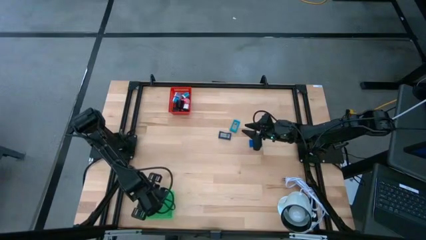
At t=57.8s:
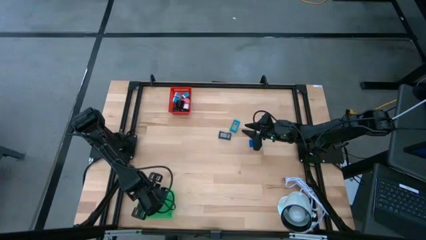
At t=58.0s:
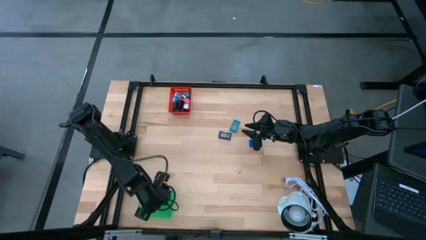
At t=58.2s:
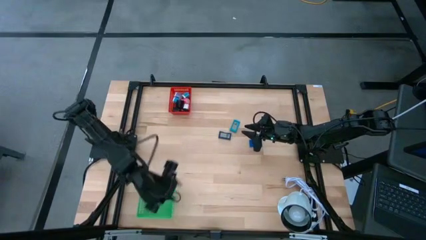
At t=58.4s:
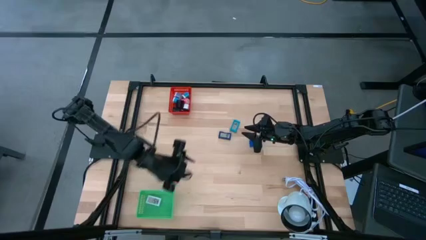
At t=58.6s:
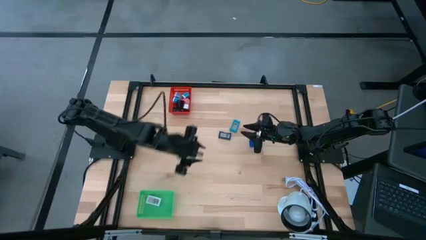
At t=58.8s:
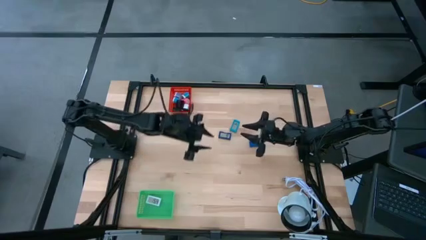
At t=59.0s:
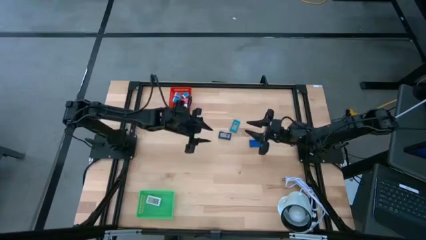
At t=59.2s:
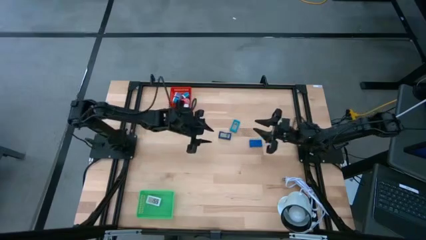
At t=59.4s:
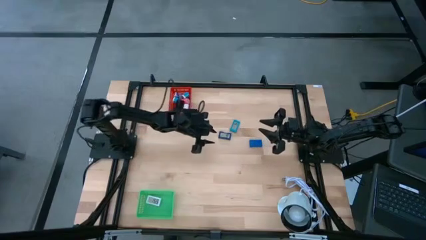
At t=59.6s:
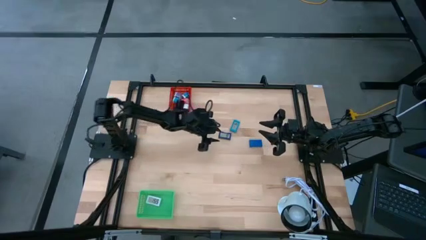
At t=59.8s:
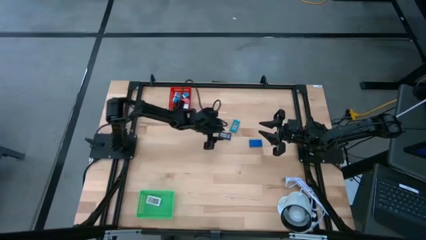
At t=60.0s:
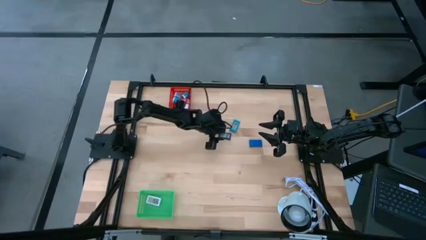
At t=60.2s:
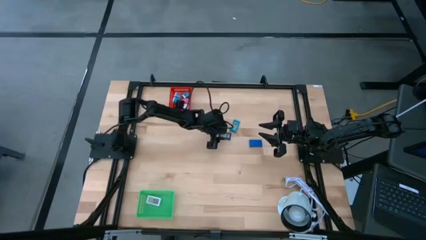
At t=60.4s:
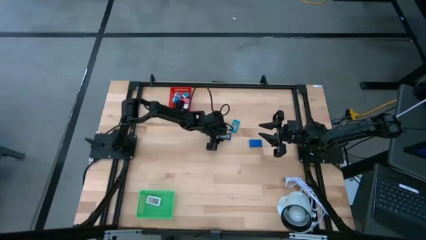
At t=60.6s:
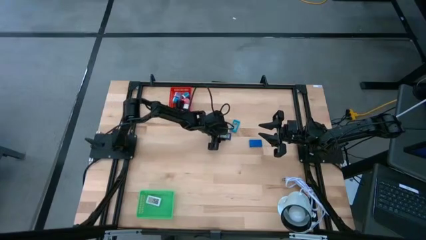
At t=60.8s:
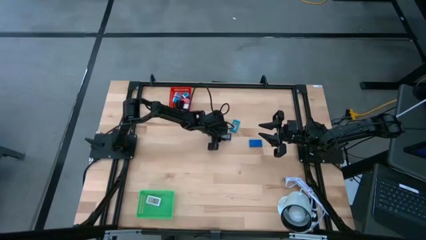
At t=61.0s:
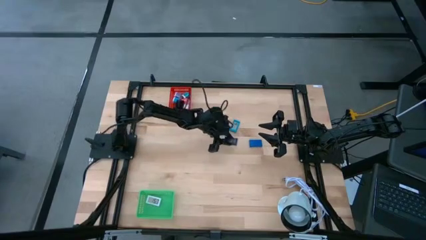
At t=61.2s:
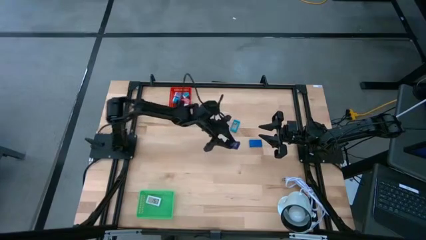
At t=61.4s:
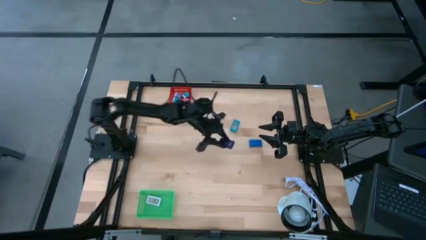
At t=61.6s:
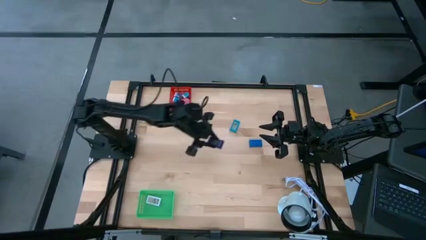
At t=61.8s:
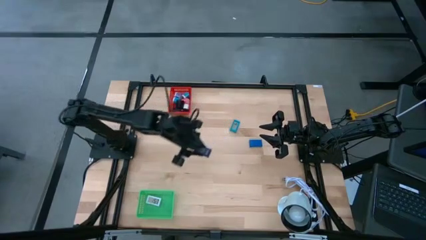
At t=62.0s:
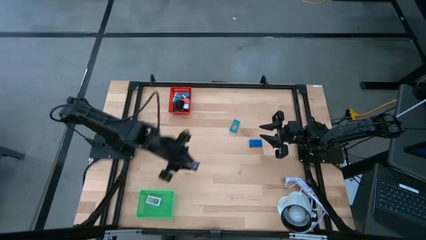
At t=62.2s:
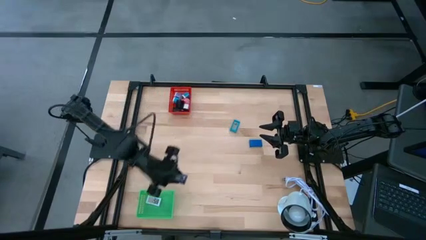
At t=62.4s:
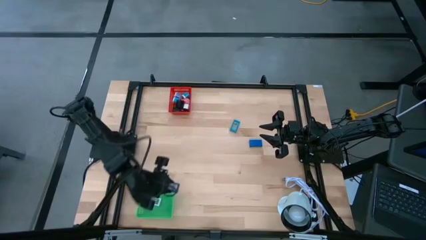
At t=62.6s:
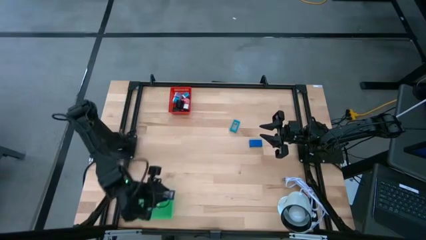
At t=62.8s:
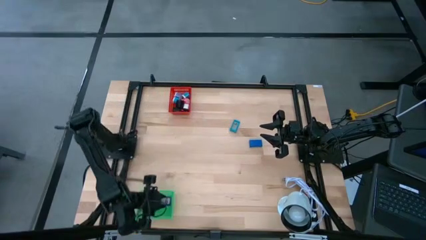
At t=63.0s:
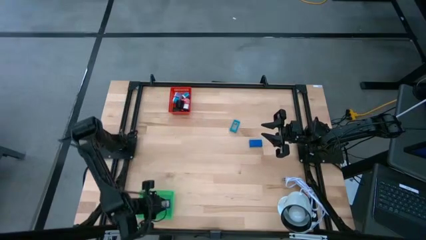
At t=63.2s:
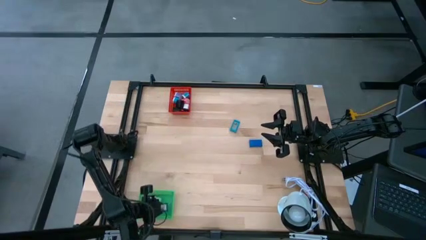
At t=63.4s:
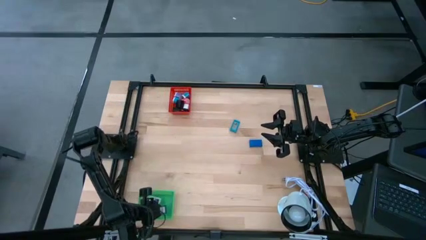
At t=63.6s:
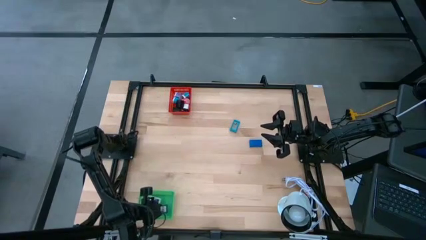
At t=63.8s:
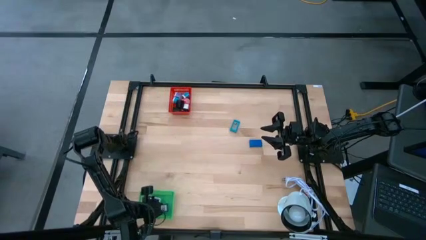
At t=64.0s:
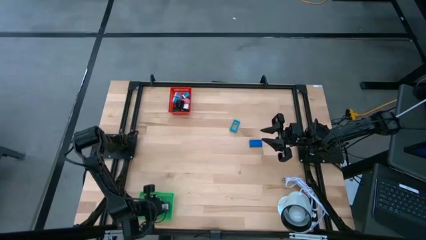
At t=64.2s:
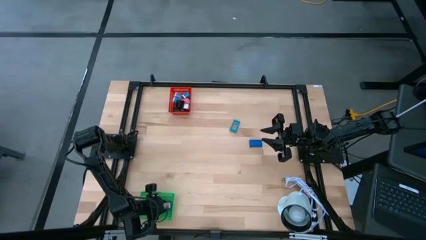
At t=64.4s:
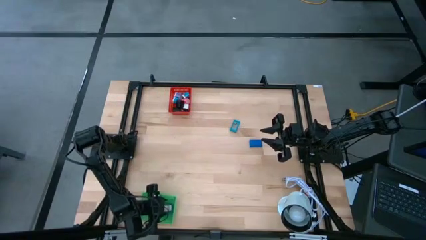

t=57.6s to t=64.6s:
Task: Pick & Place Office items
Put the left blue digital clock into the green bin

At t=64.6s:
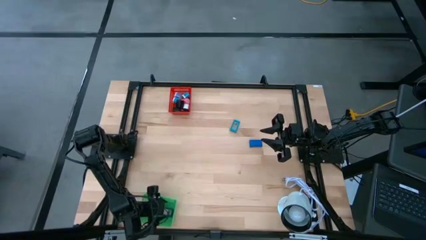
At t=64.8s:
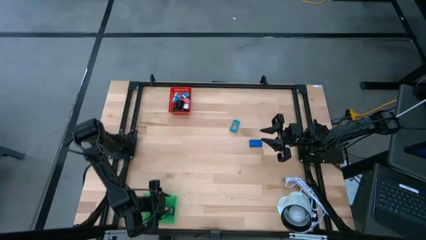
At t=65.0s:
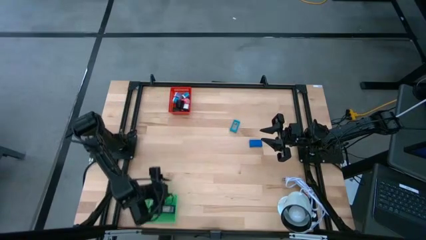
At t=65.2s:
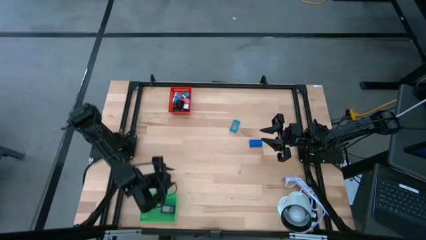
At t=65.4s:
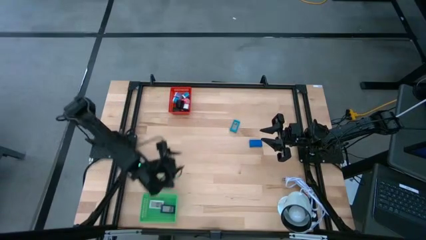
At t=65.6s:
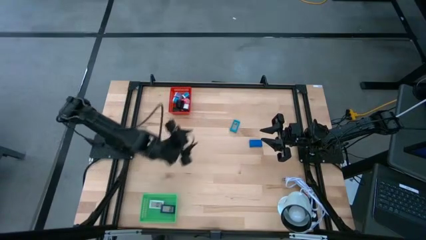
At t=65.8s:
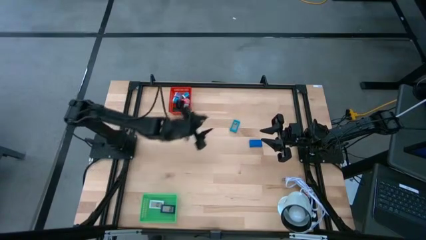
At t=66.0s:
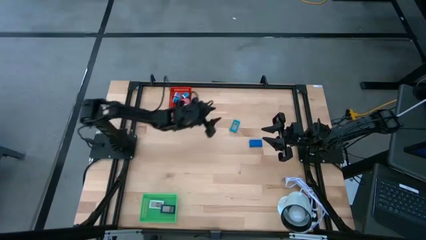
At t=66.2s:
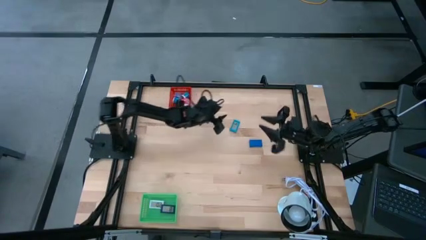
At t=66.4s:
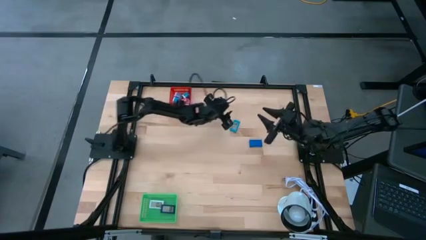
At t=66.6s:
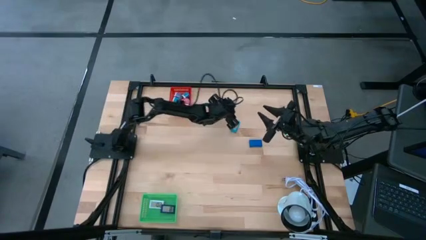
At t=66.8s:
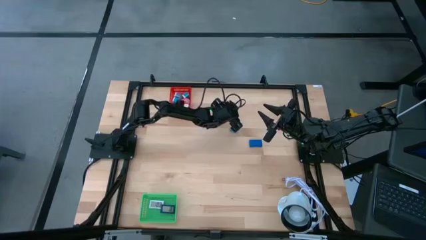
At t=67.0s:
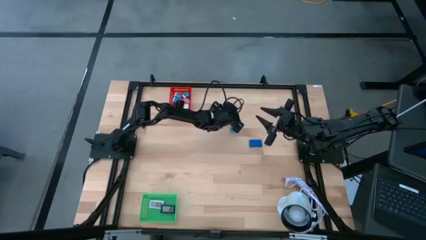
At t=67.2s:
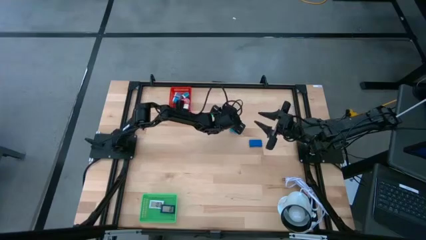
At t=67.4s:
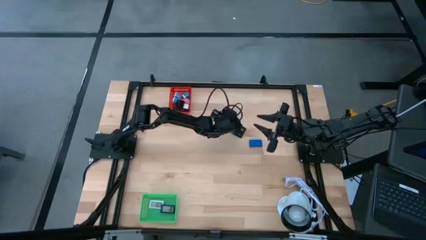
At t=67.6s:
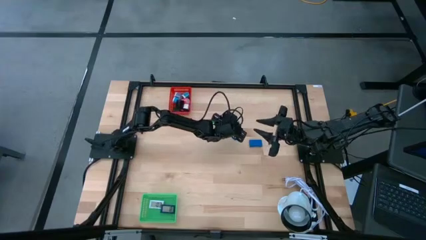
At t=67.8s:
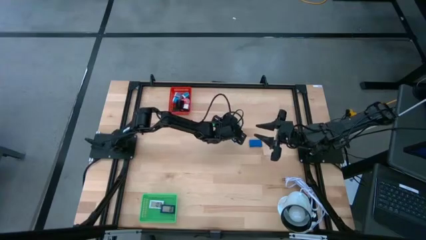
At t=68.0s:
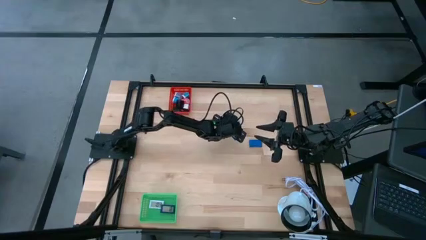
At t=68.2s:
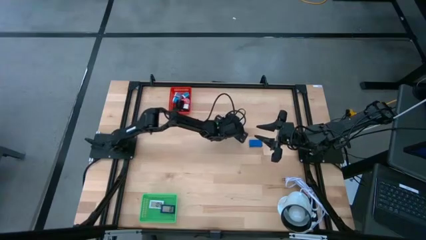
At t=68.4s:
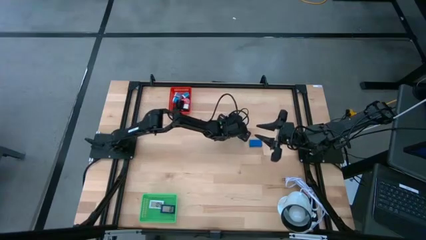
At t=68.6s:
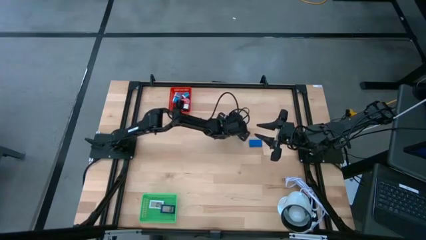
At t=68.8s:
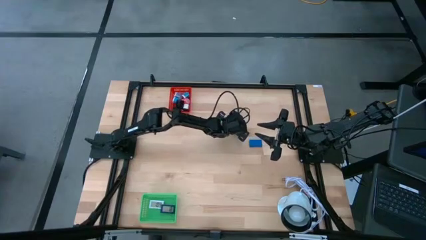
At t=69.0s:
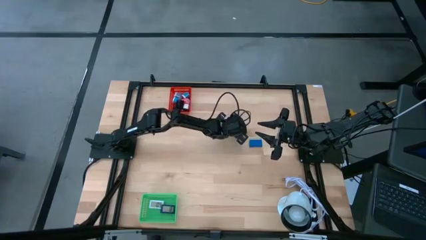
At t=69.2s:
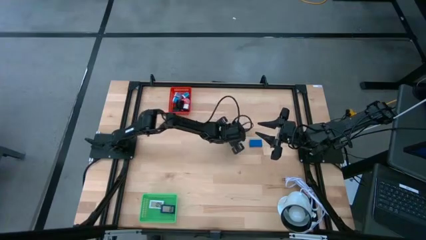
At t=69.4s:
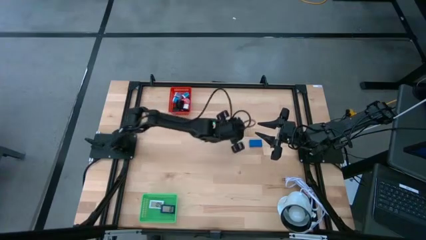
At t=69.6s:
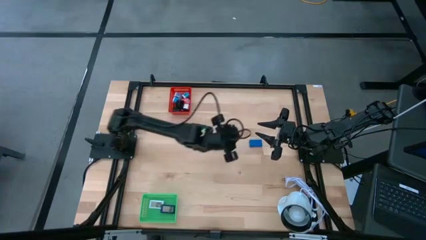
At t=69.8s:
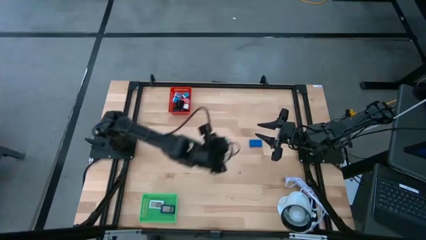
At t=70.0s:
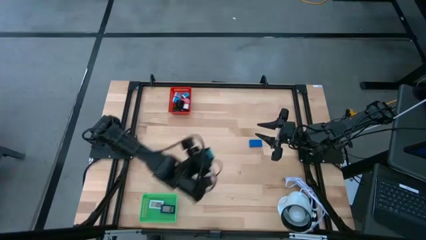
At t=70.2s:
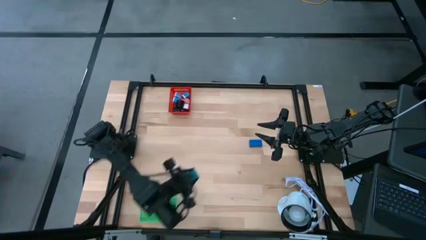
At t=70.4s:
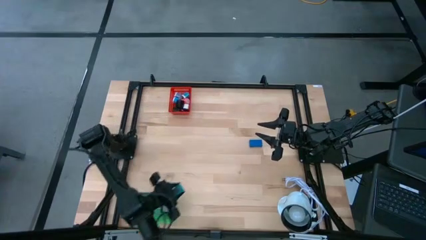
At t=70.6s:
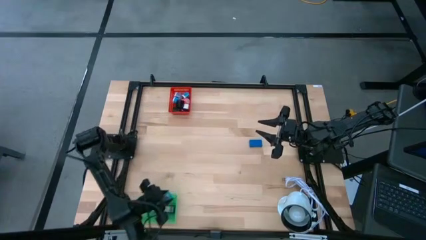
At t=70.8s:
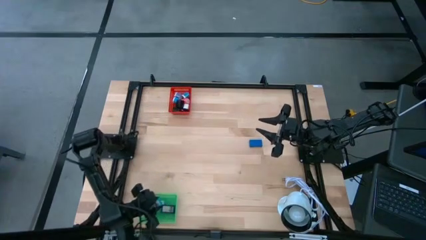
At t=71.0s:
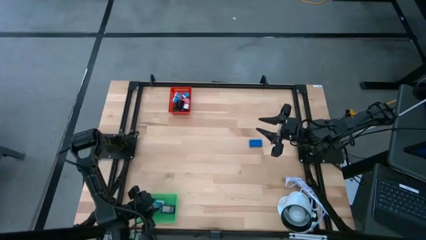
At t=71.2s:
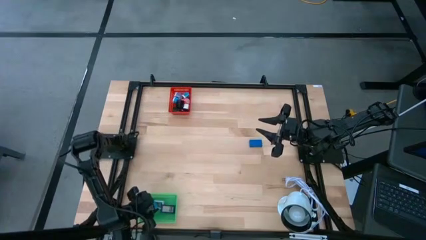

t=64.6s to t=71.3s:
Put the light blue digital clock into the green bin

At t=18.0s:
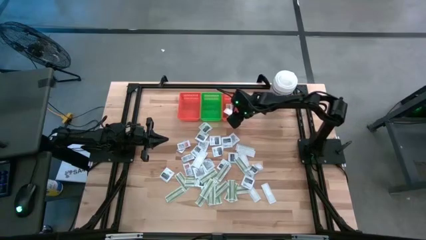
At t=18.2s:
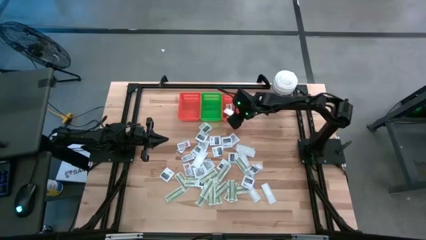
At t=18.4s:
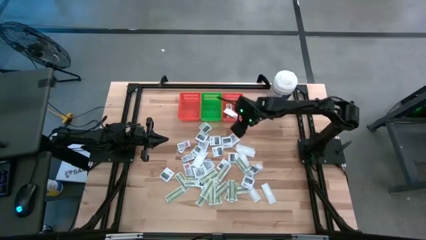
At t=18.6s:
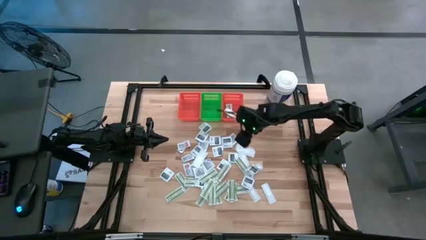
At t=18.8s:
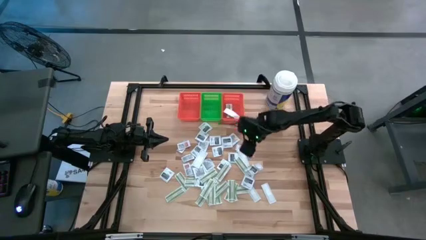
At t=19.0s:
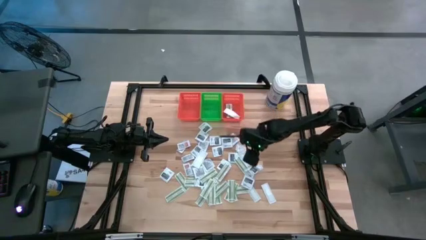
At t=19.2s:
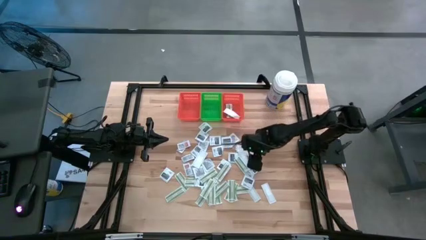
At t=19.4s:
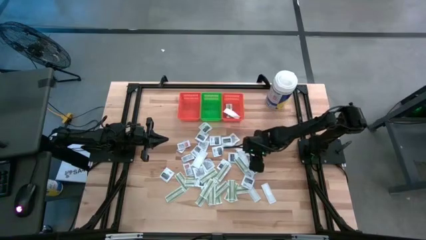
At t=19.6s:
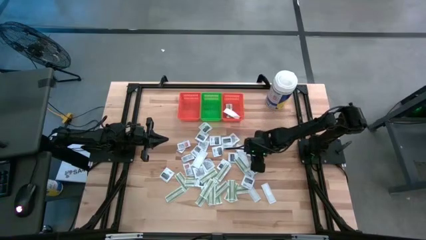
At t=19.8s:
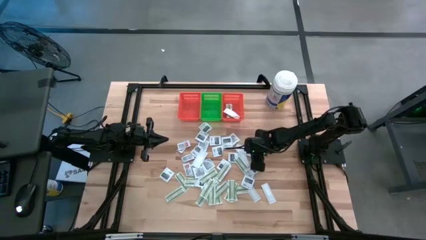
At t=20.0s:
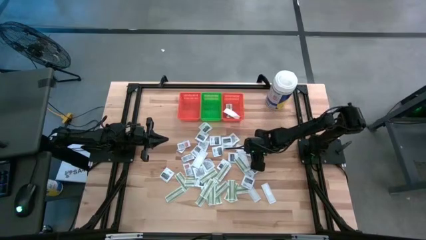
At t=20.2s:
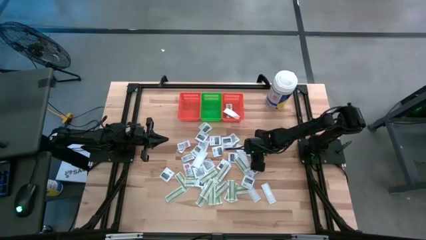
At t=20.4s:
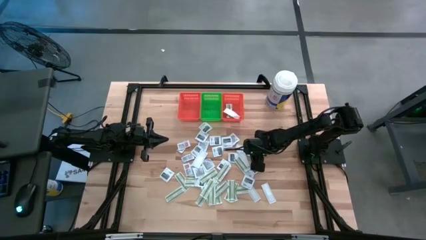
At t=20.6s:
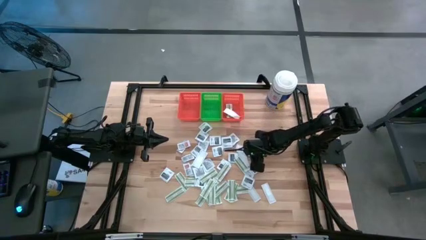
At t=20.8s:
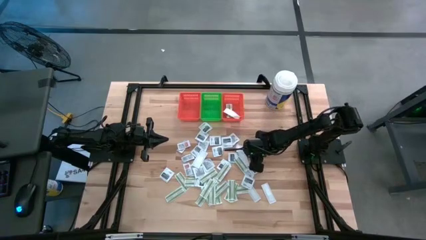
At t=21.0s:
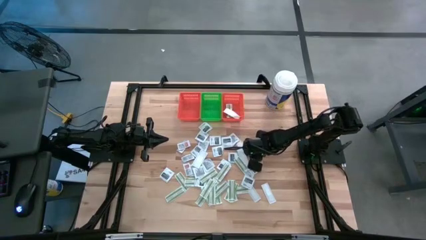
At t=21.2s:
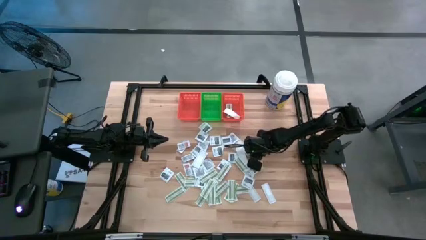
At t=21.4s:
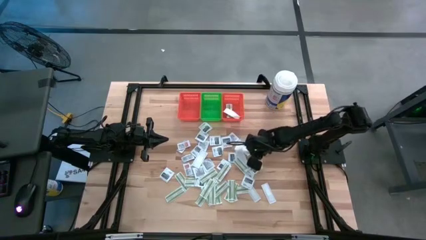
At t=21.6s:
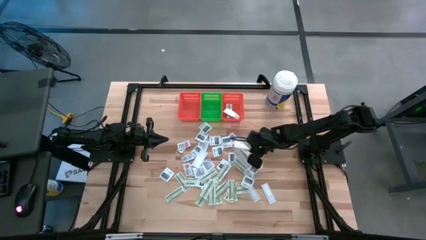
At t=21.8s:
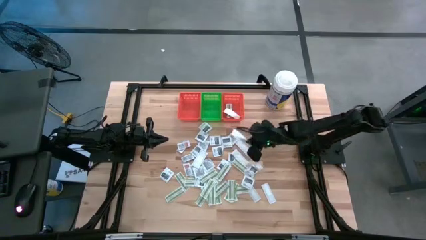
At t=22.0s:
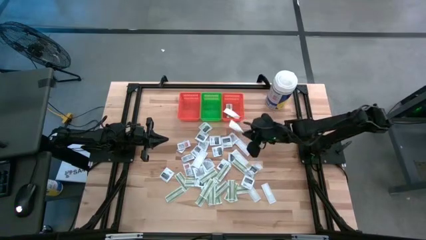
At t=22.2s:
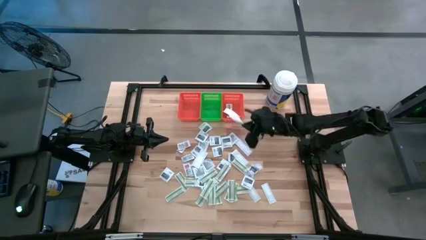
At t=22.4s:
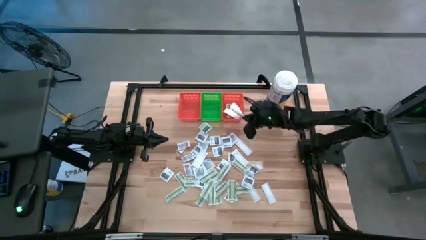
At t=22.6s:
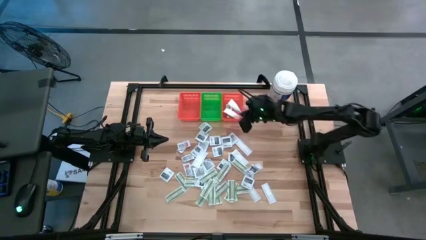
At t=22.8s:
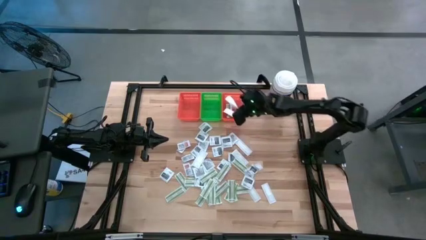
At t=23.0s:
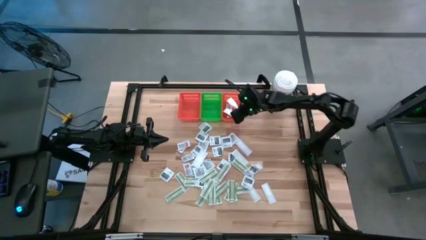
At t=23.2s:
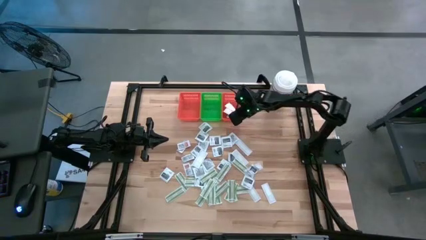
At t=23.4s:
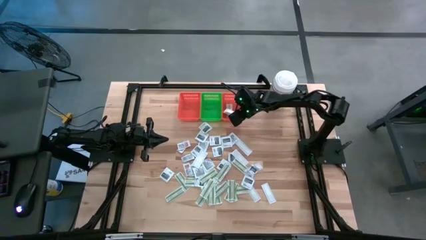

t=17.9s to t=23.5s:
Task: Pick & Place First Aid Supplies
Put the bandage pack into the right orange bin
